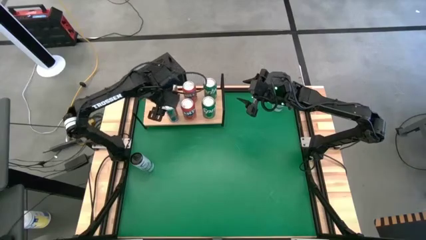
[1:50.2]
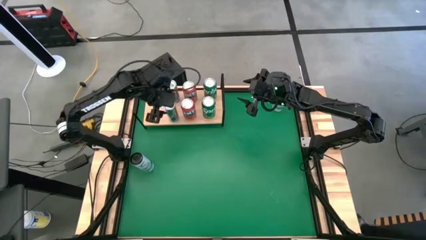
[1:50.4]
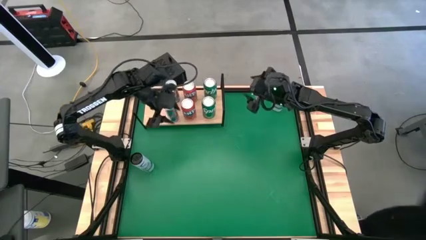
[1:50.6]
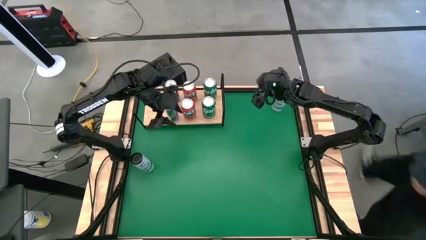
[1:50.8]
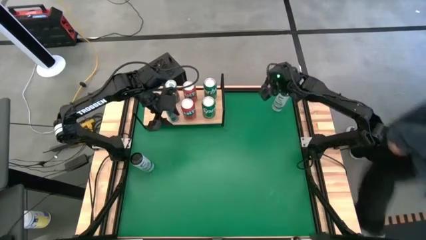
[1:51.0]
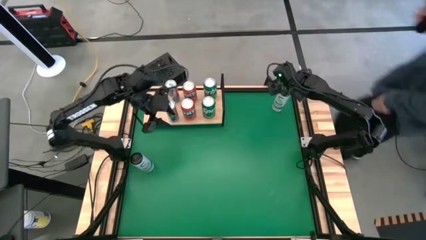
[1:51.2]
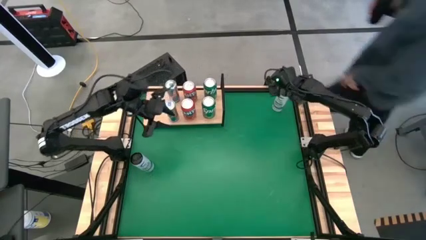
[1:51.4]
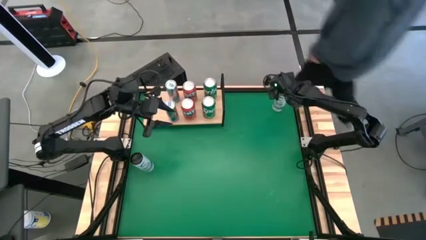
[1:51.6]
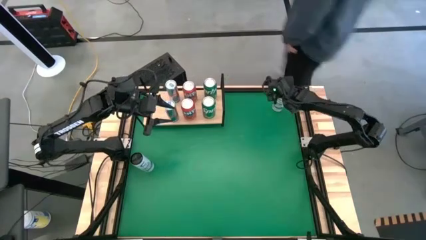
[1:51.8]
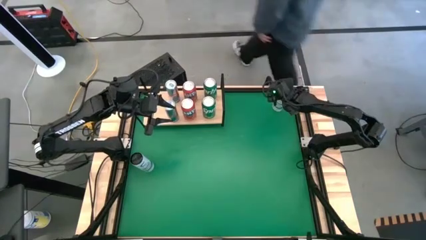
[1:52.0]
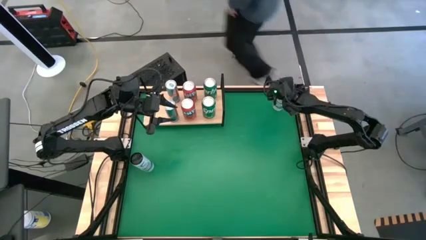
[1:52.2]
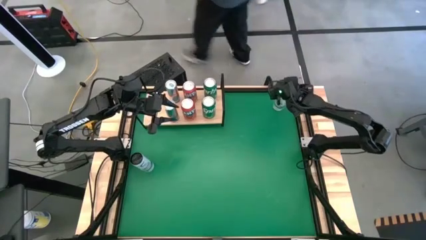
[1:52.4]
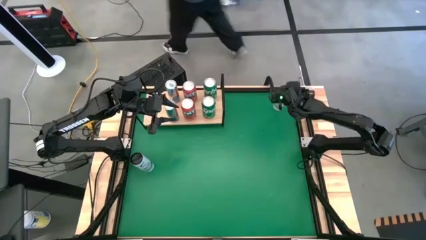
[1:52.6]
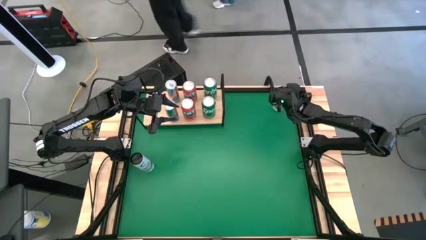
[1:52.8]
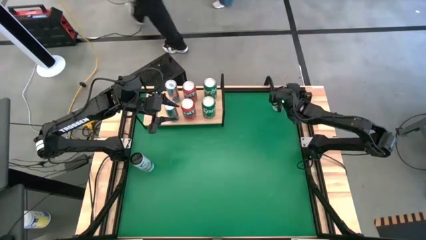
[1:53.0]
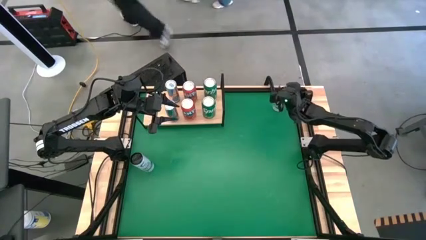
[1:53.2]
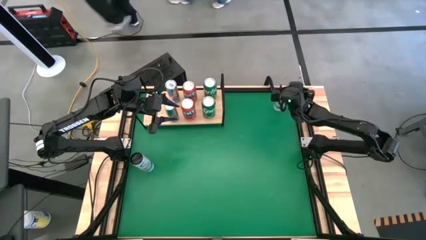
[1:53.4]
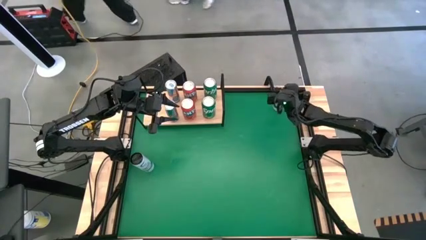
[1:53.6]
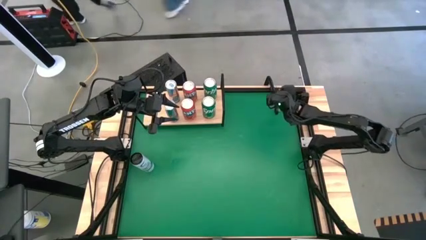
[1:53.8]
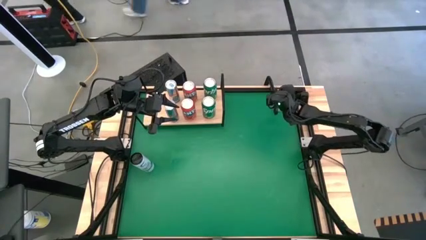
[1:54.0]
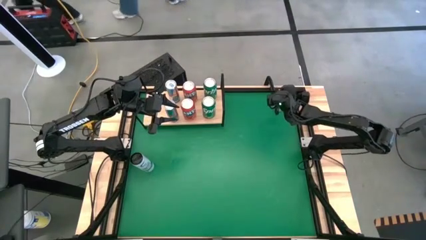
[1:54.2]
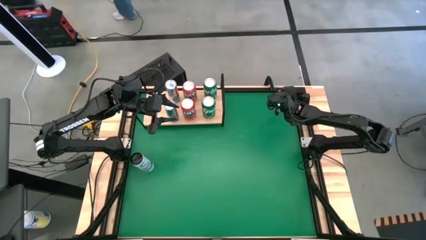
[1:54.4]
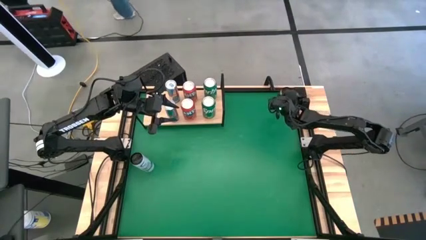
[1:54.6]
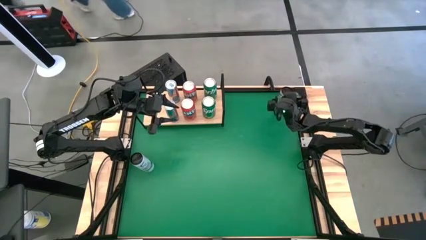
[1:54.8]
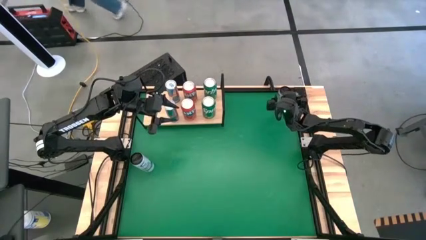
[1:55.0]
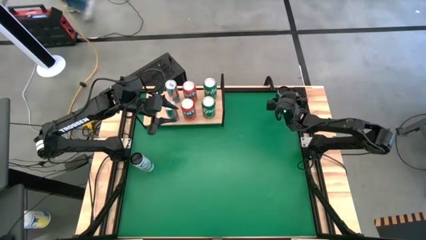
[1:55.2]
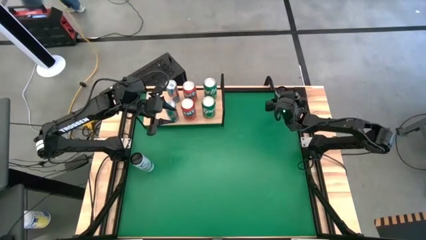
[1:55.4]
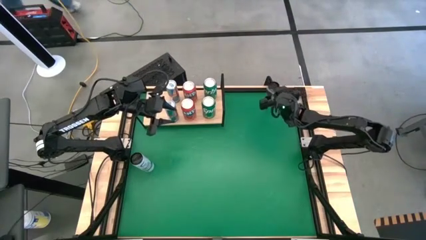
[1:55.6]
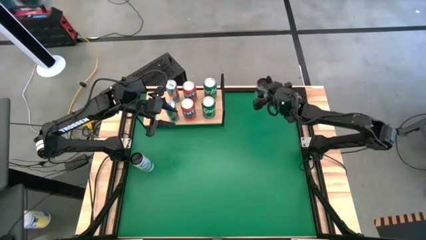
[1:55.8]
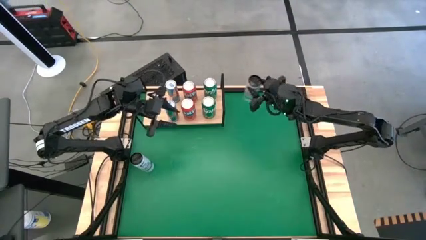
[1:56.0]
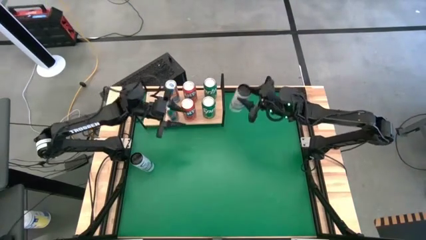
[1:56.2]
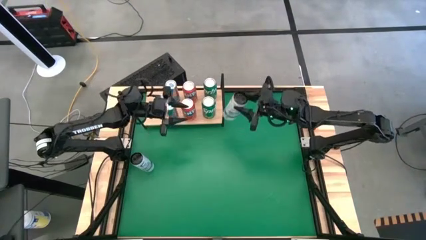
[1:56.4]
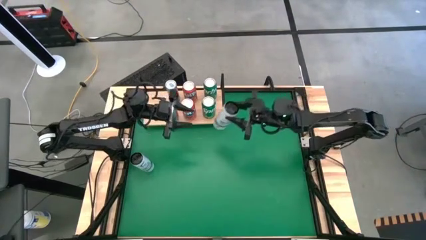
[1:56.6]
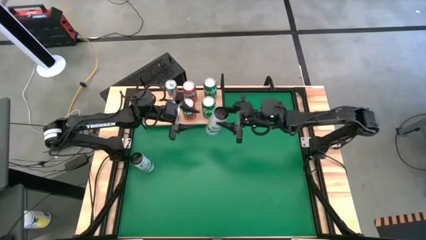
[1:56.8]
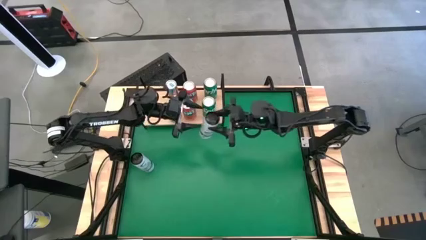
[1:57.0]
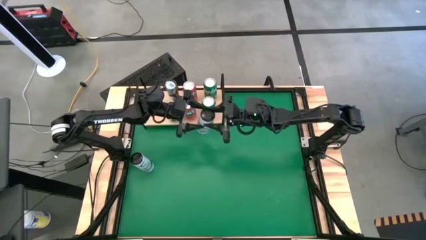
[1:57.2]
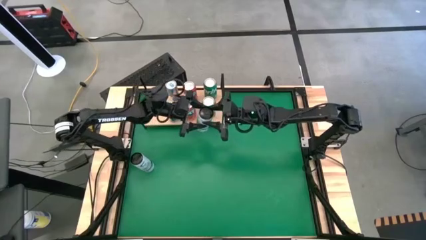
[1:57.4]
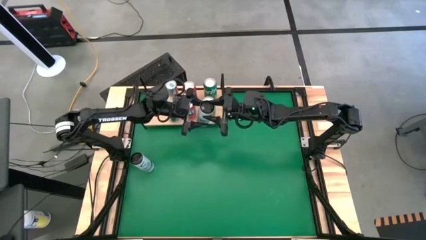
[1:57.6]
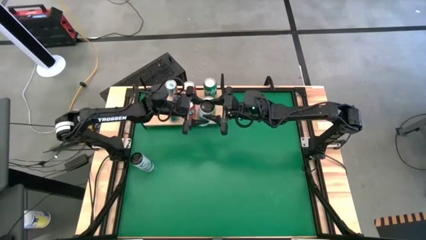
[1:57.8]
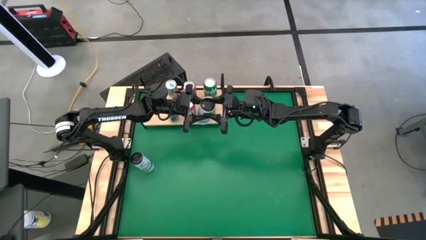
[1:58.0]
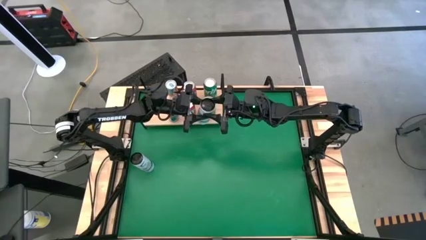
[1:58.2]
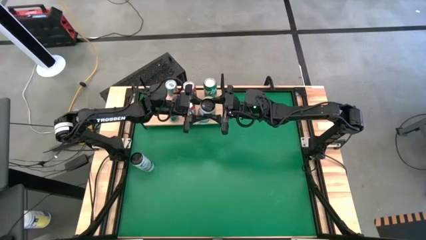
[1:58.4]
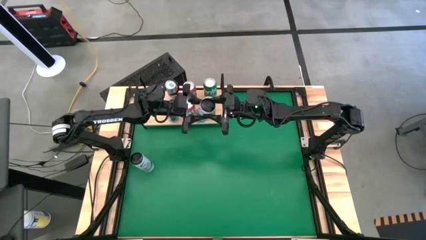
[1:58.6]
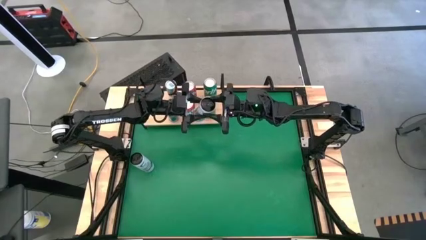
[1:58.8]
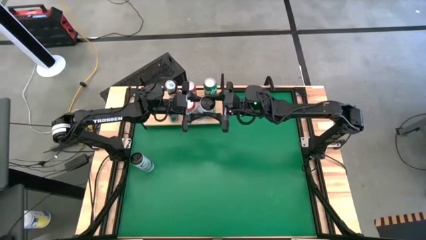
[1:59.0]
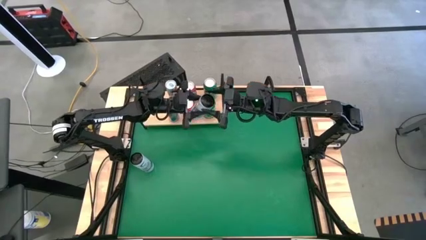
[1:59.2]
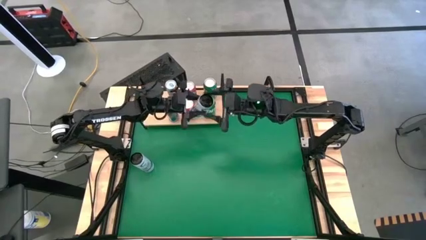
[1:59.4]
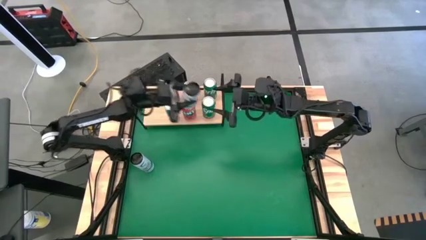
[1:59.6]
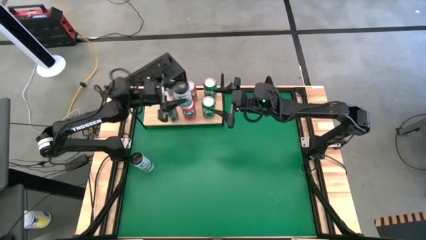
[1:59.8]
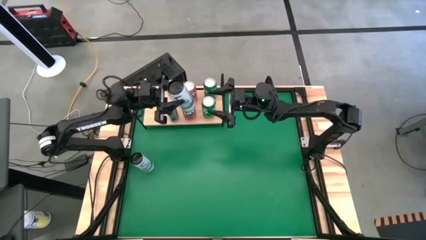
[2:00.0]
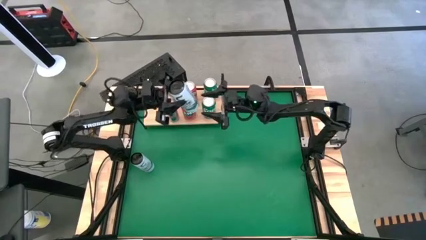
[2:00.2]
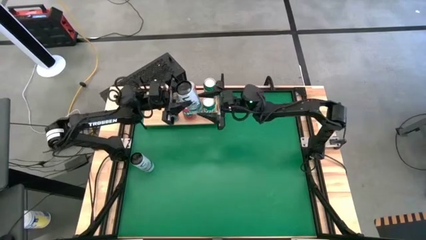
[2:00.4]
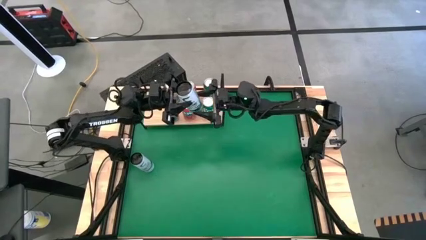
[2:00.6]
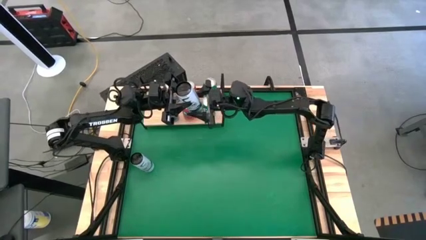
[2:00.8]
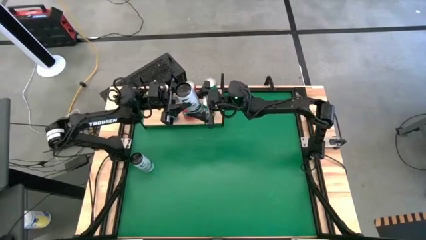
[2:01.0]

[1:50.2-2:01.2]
Task: Place canned beverage on shelf
Put the top white-blue soda can on the shelf

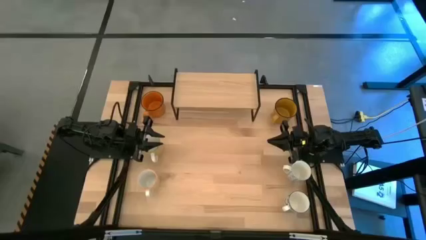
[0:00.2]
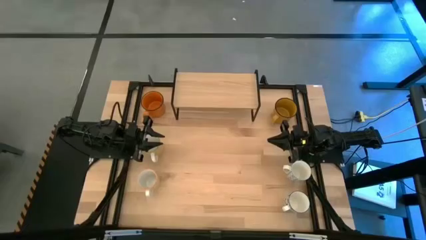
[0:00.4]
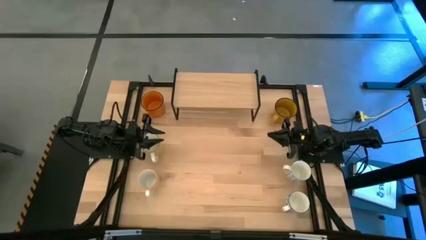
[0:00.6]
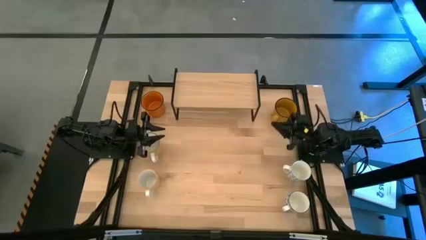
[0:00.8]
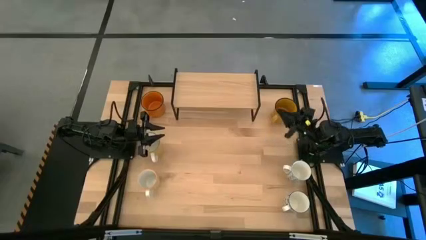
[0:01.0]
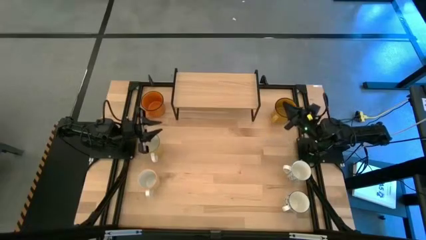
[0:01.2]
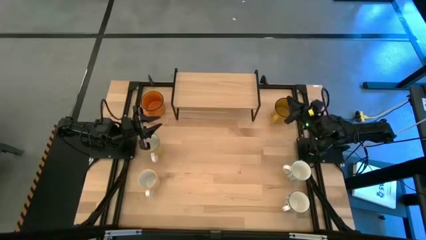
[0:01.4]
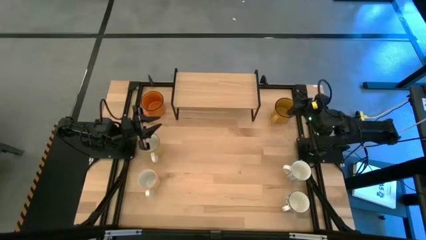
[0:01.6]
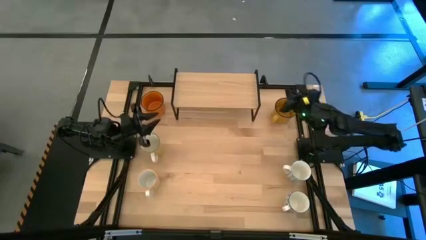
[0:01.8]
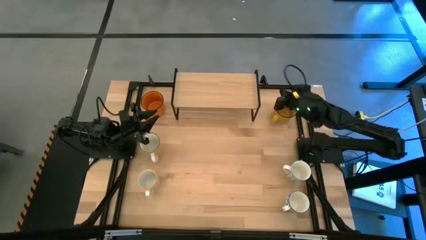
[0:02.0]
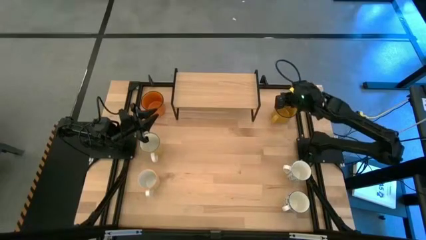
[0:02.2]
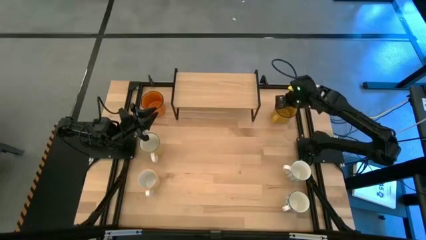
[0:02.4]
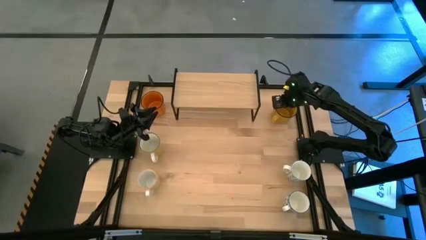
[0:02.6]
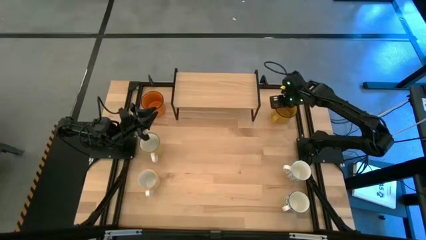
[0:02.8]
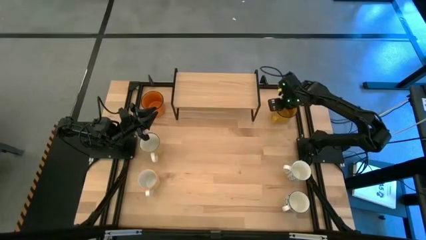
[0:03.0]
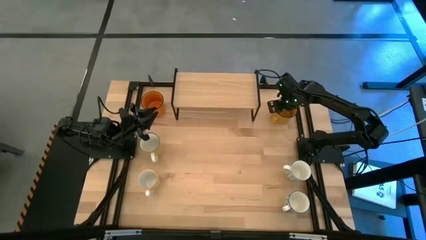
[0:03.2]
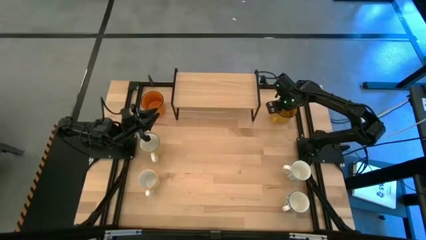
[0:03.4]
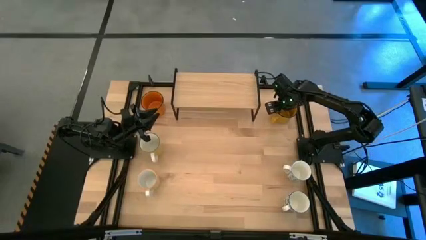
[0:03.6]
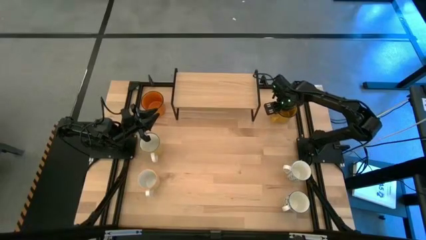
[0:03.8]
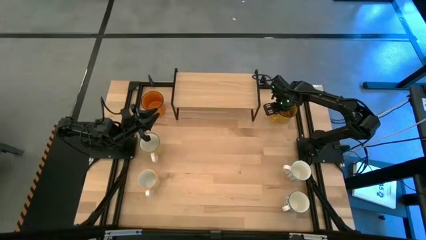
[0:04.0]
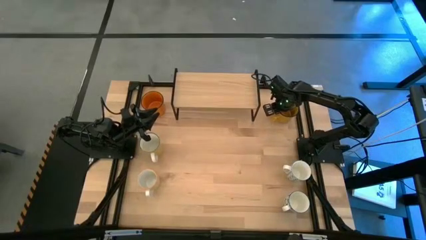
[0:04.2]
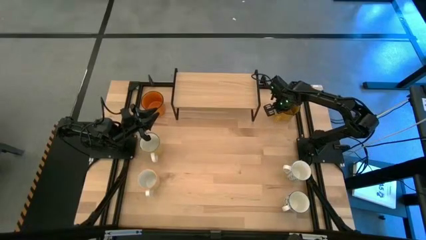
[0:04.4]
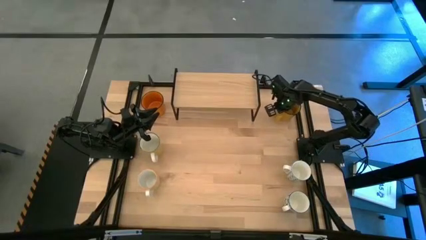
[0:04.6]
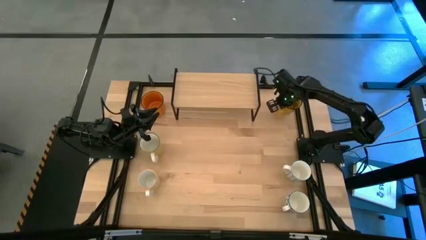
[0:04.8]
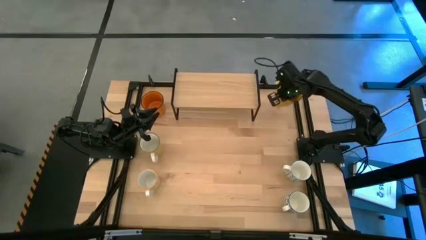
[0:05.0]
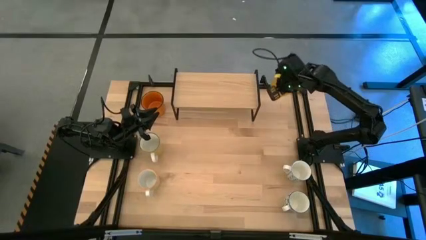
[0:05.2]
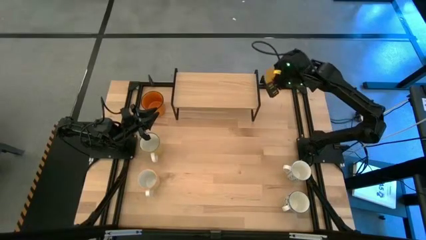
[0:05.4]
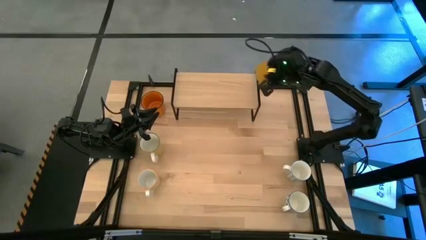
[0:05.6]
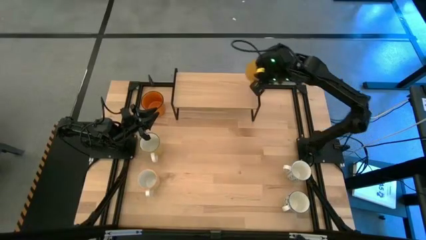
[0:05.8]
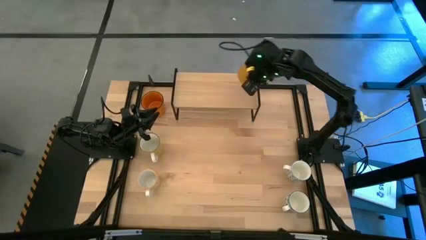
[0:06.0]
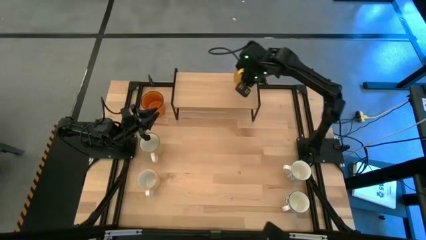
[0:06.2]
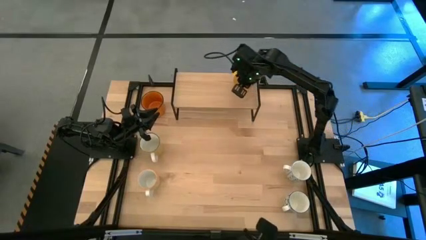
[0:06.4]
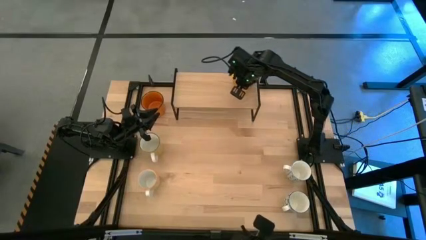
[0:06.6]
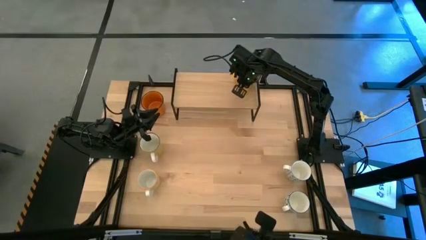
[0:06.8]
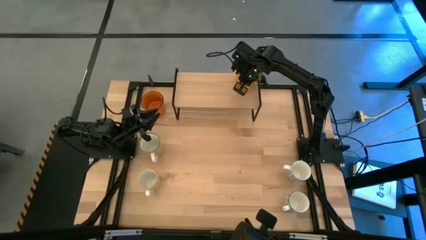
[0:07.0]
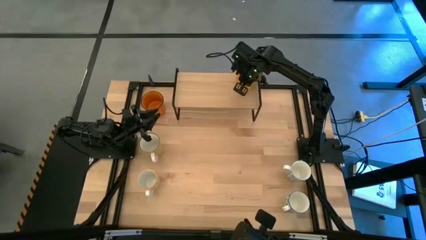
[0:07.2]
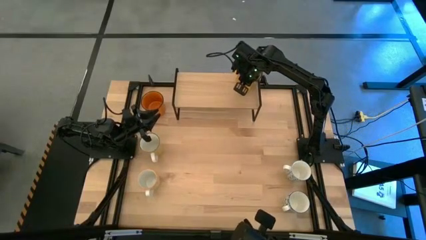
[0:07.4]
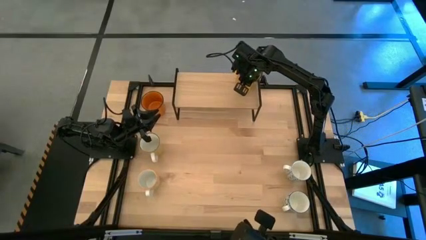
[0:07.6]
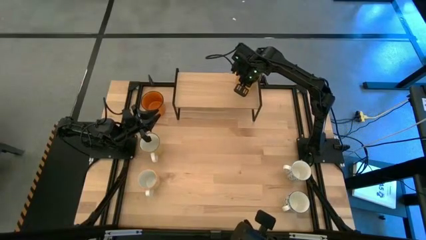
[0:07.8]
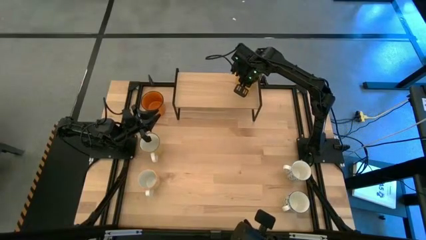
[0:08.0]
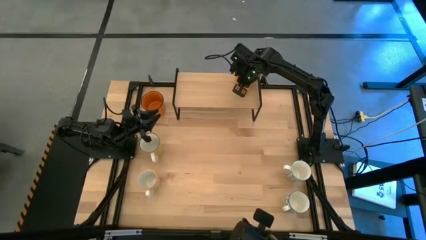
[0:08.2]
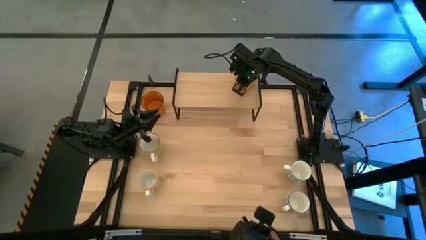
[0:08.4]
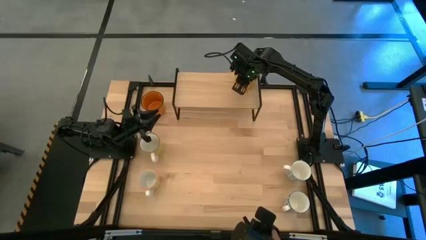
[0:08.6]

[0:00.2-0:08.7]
Task: Place coffee mugs
Put the dark yellow mug on the shelf
